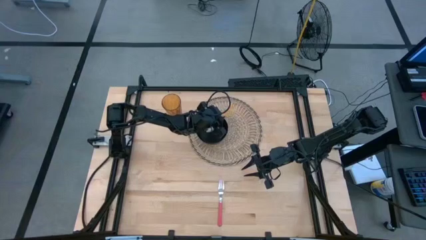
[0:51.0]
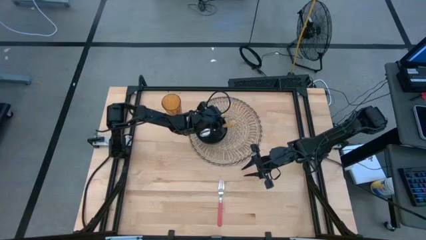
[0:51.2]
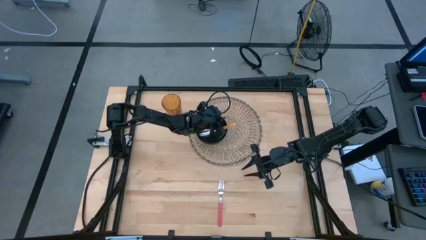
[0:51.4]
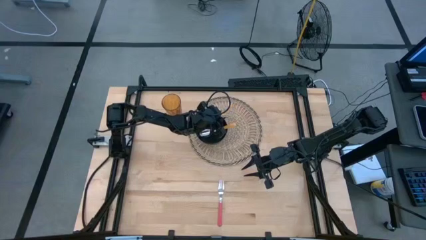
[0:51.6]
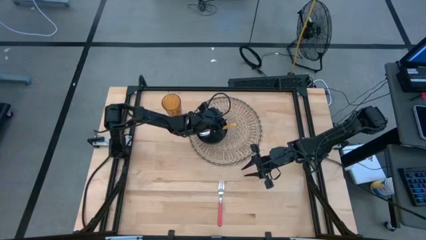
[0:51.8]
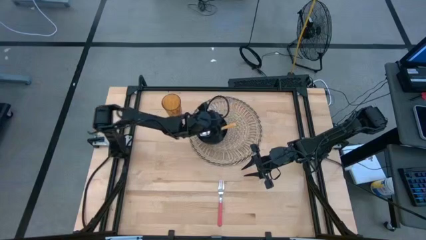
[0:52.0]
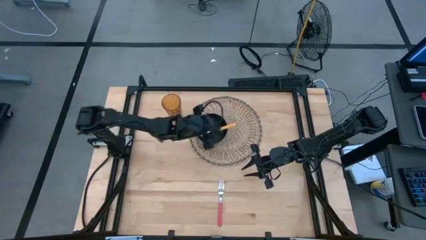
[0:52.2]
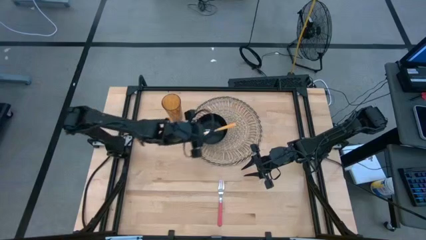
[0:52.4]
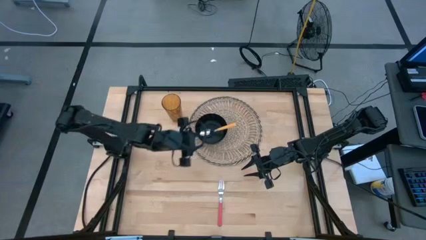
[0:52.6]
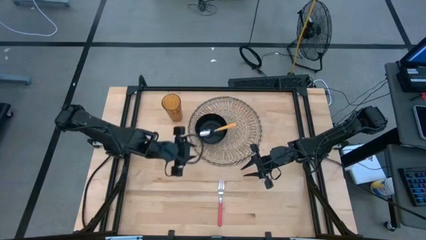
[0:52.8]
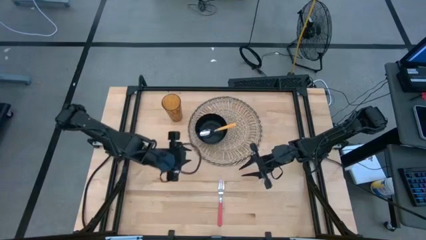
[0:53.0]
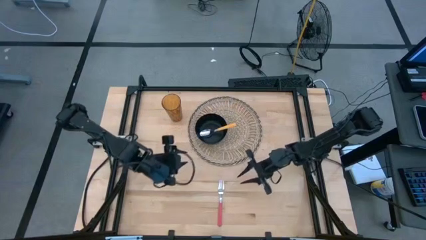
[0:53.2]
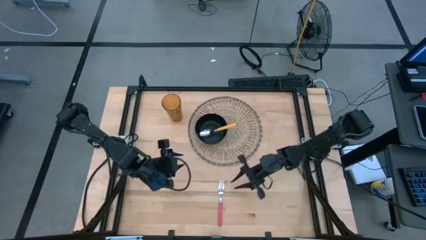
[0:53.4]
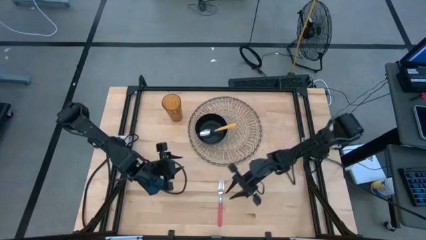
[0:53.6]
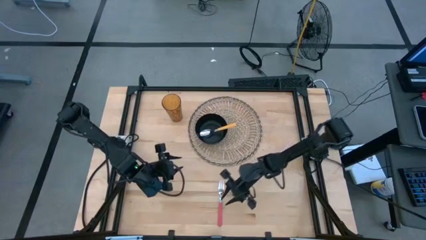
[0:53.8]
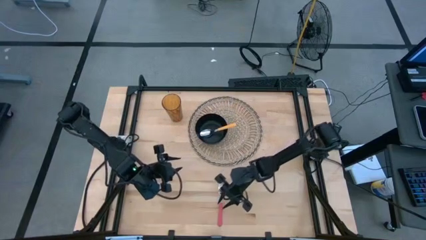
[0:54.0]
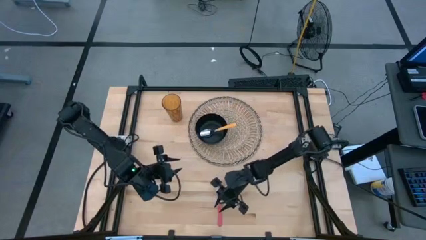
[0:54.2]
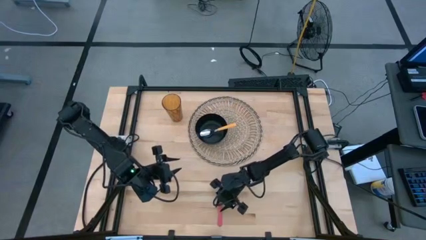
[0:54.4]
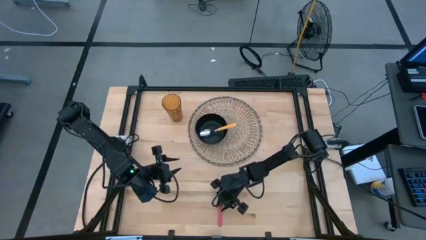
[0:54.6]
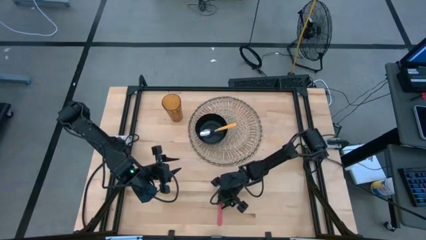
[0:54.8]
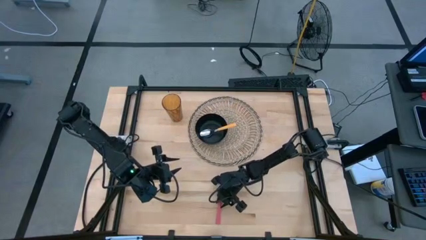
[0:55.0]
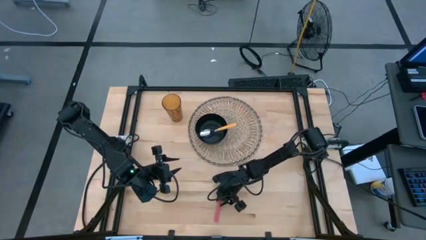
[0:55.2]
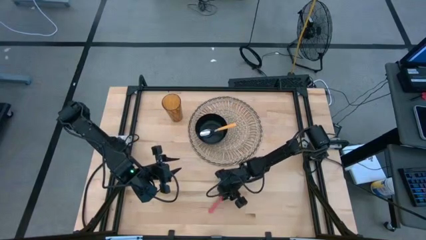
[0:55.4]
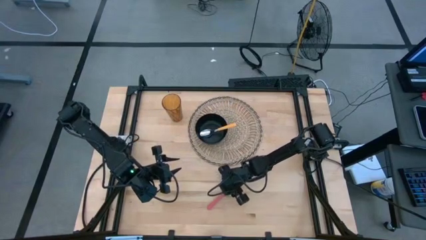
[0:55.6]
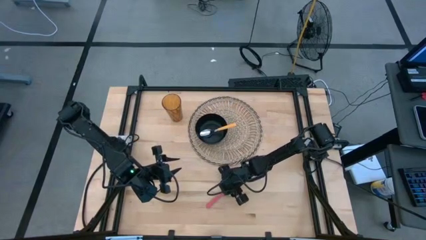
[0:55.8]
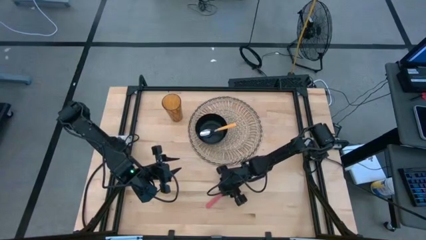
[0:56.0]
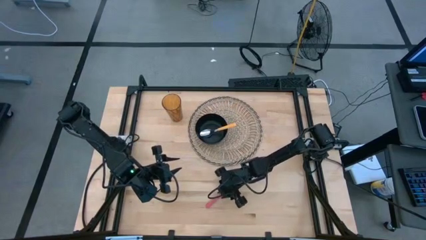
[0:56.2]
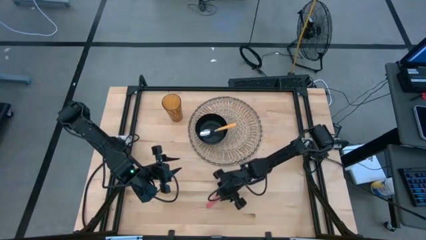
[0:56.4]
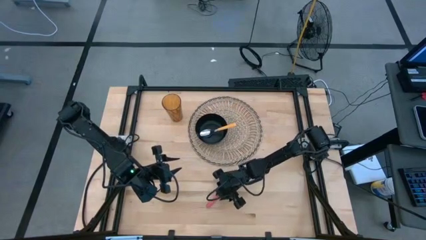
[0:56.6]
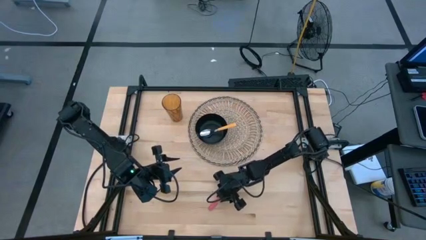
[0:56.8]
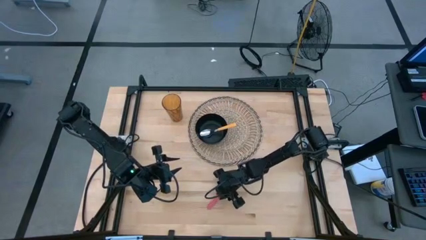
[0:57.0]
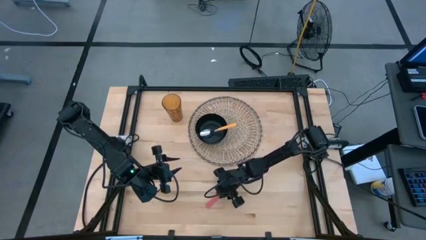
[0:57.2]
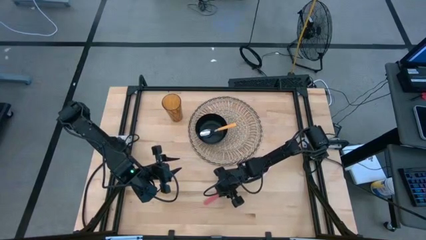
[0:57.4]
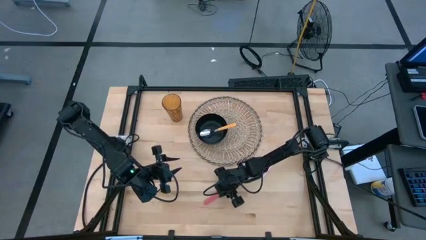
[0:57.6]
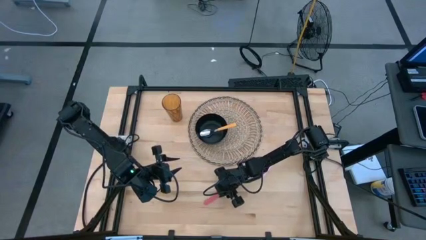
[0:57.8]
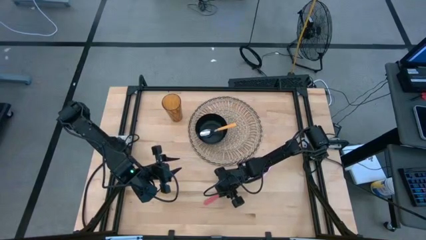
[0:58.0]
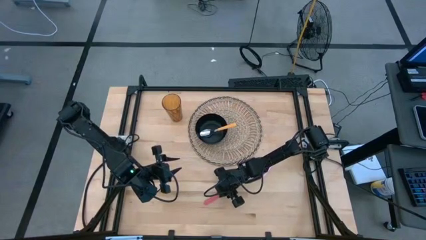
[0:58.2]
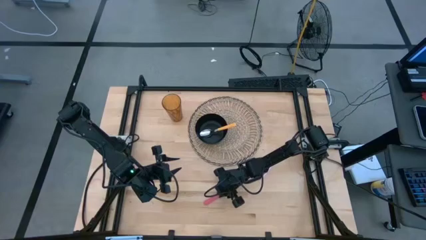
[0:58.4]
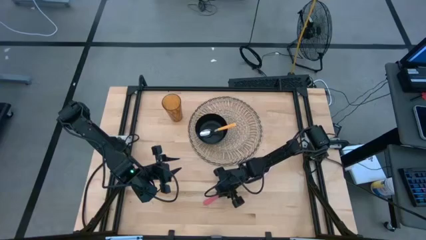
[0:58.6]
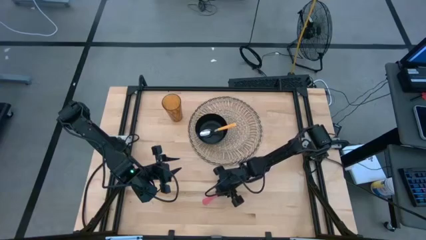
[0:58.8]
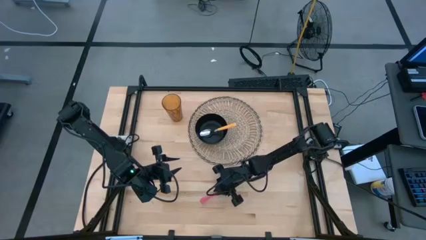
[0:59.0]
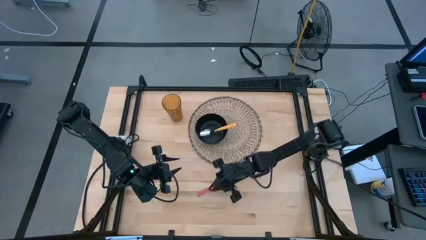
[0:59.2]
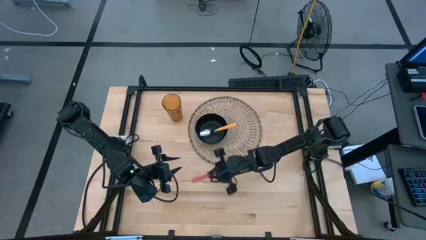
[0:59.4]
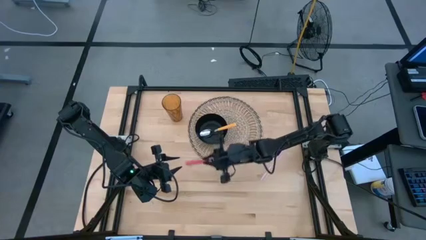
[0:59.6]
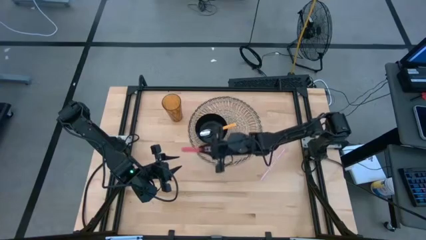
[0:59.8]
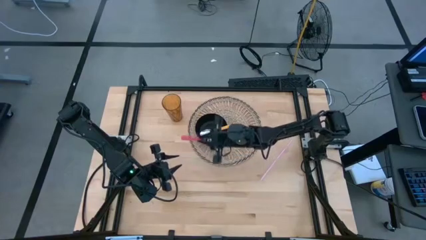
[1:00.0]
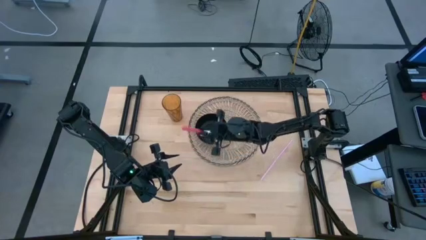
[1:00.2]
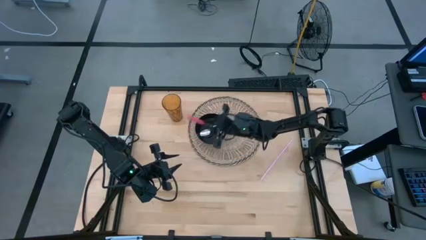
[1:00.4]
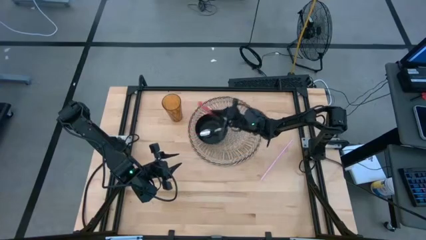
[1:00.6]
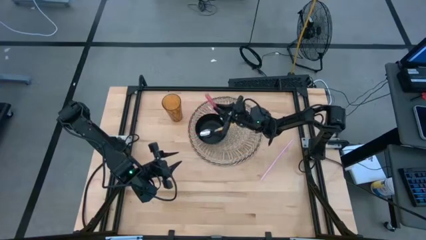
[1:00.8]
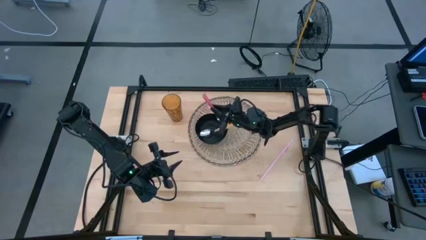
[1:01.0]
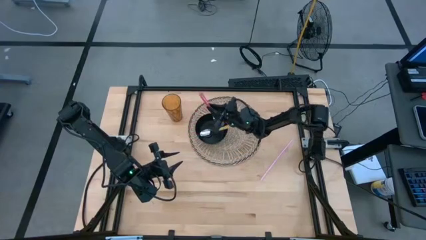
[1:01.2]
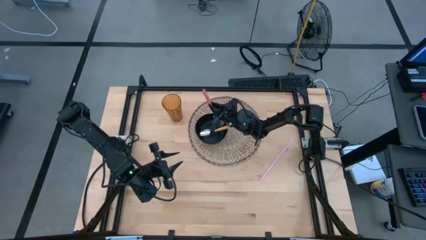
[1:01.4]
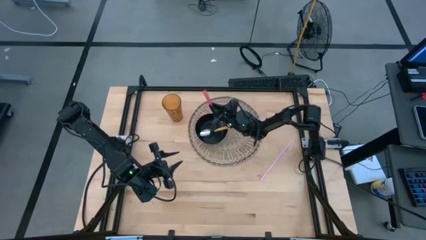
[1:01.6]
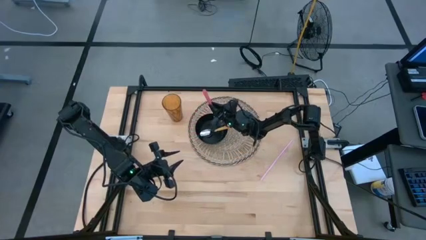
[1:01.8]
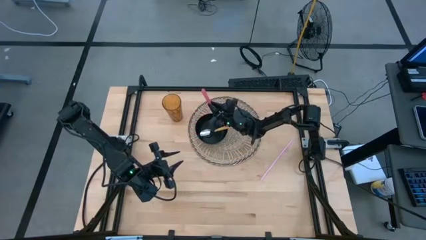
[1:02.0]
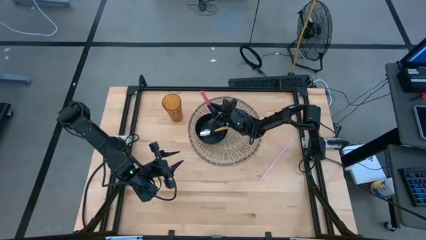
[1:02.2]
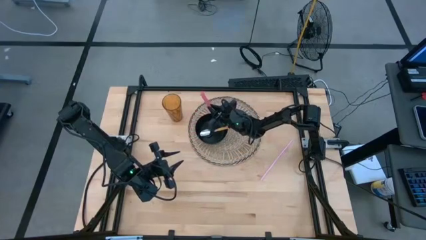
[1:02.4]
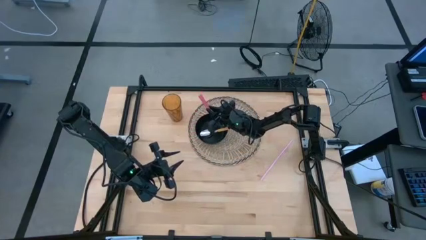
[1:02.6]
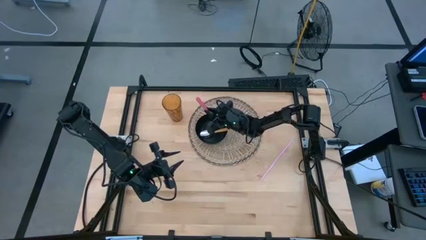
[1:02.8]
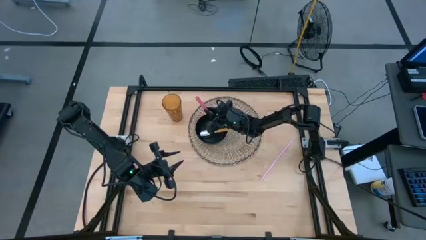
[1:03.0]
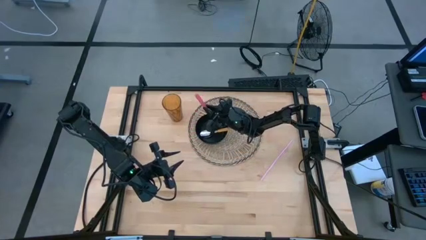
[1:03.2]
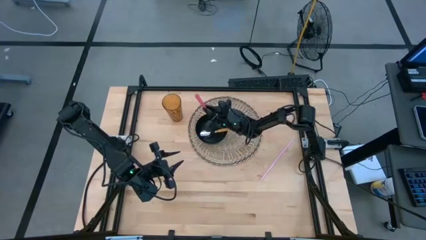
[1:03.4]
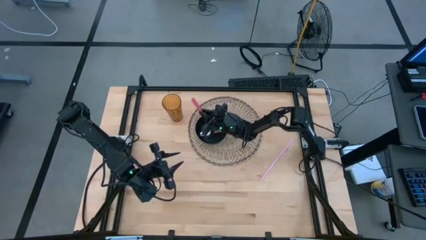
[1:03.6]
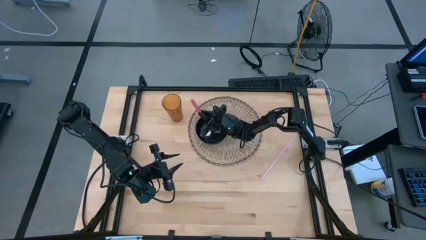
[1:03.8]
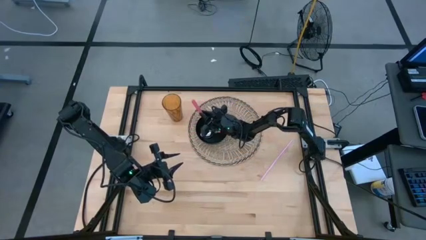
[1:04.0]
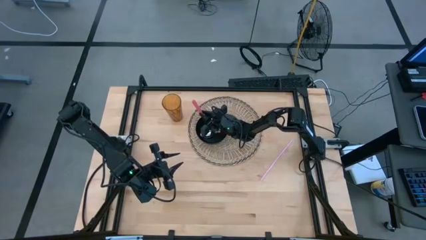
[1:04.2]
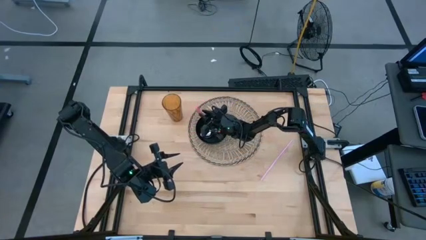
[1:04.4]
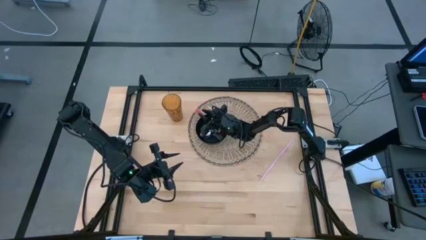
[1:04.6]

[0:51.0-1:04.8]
Task: Pick & Place Utensil
Put the pink fork to the left of the yellow spoon into the black bowl on the brown mat

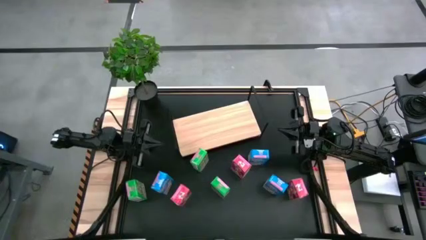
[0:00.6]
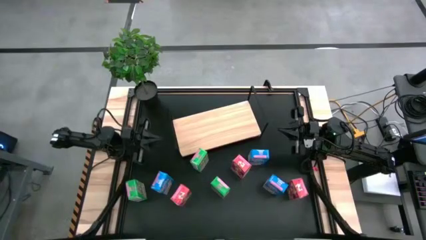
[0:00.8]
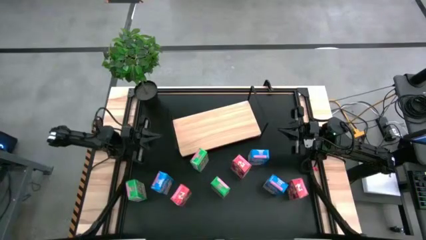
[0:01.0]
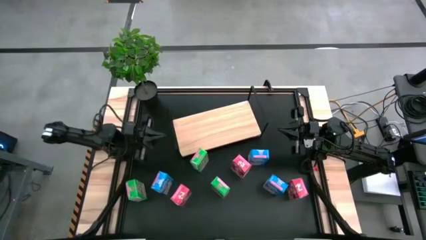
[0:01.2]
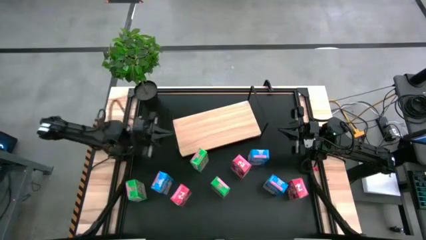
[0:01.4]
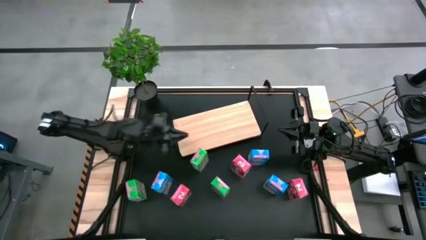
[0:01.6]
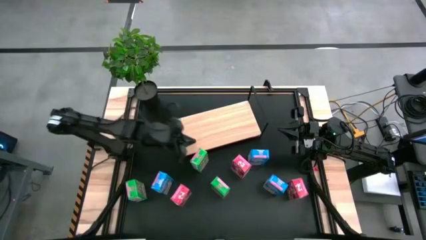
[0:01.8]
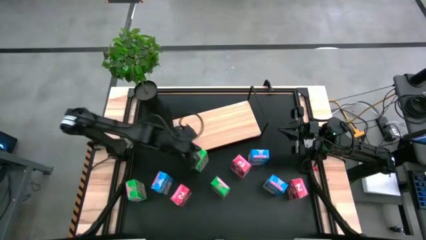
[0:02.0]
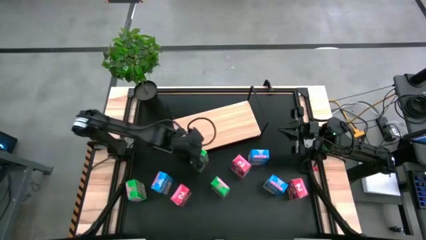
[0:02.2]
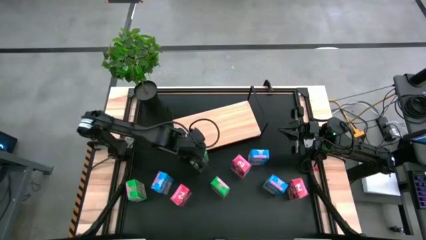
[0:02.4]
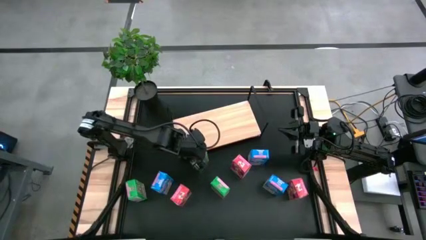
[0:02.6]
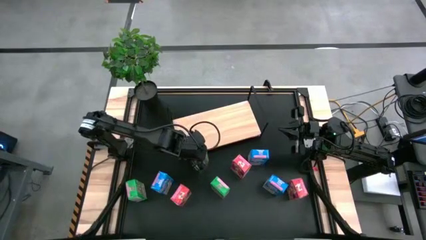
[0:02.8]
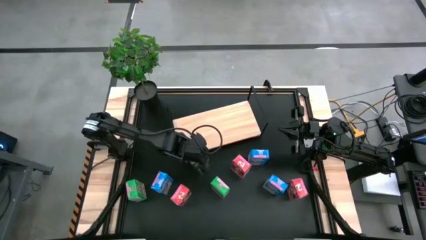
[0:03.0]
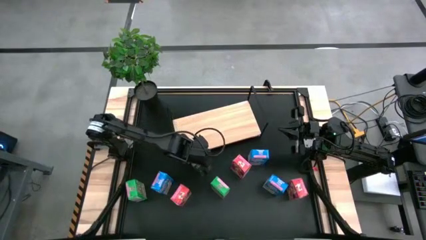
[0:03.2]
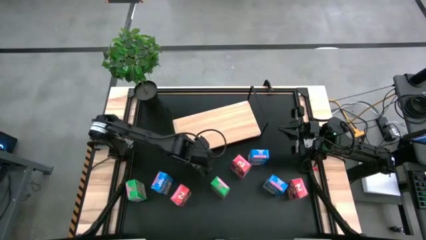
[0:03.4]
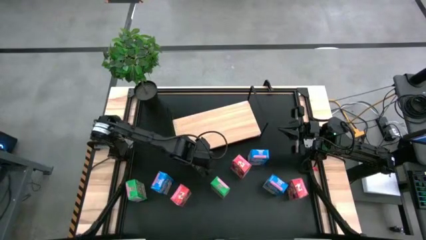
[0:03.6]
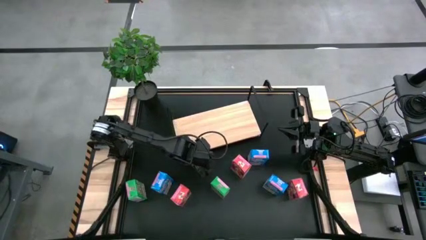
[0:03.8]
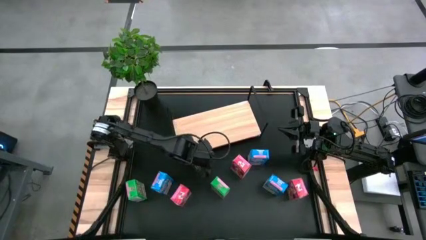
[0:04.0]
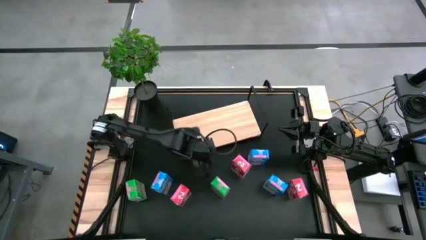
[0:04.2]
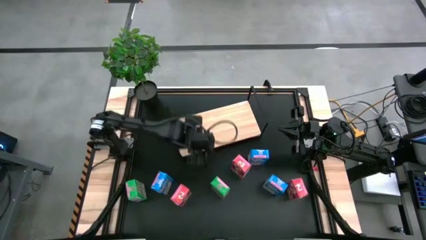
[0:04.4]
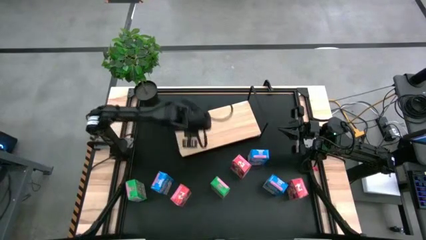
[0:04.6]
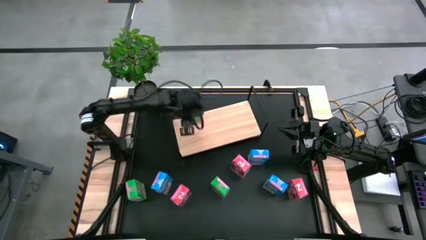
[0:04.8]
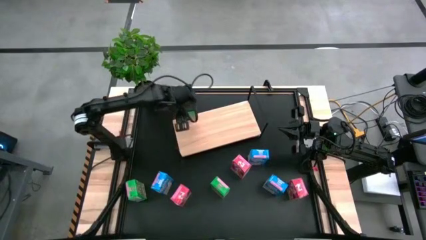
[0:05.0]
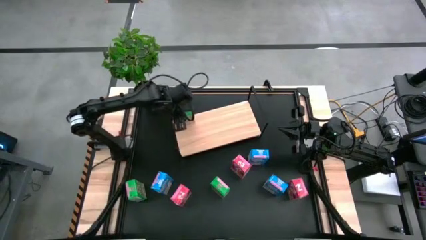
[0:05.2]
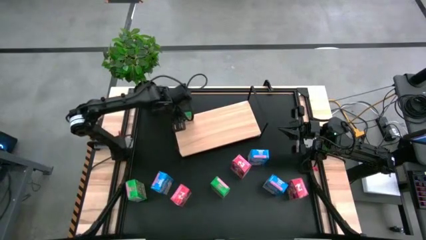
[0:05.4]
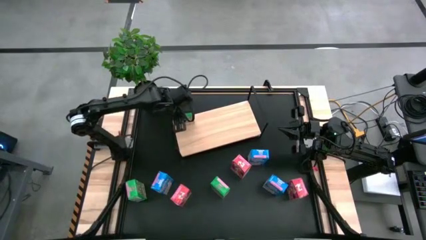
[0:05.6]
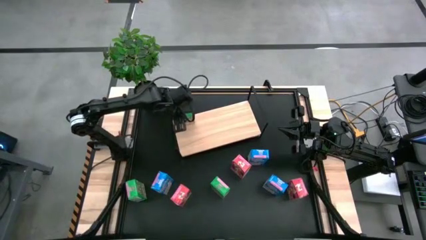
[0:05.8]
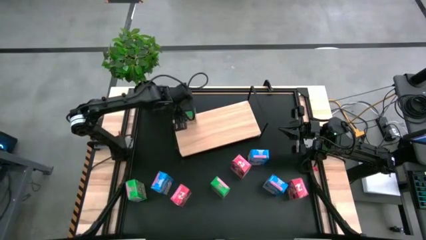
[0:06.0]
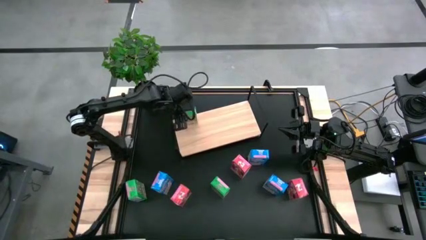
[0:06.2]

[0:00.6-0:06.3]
Task: Stack cereal on shelf
Put the middle green cereal box on the shelf
